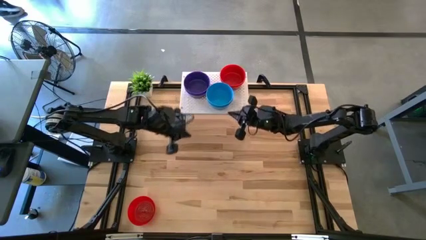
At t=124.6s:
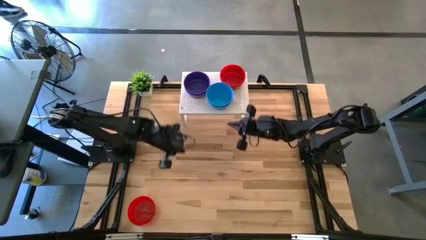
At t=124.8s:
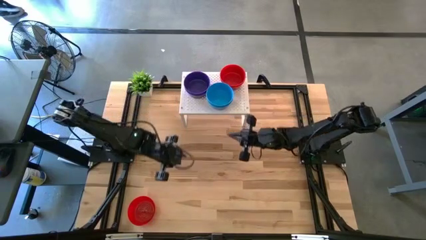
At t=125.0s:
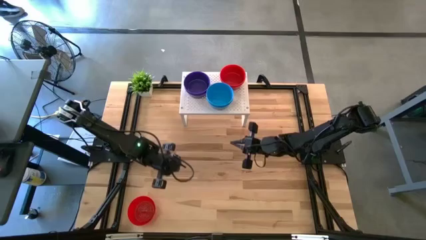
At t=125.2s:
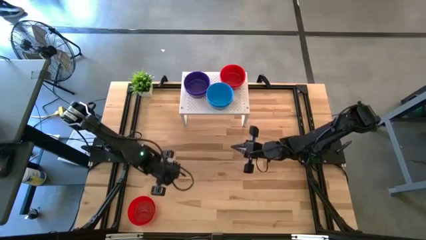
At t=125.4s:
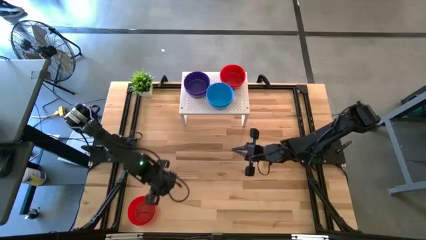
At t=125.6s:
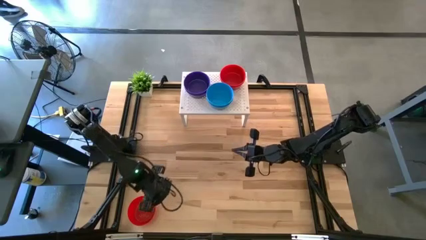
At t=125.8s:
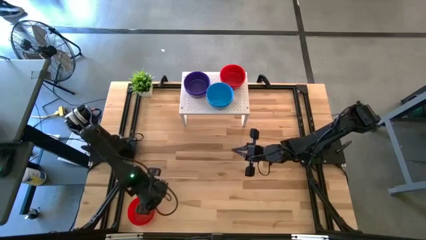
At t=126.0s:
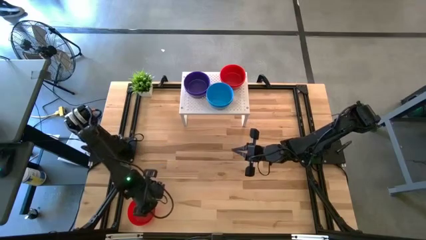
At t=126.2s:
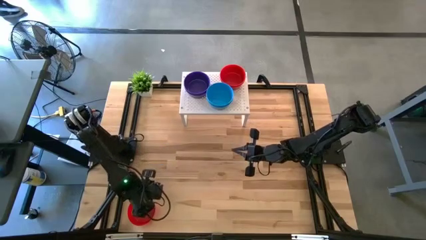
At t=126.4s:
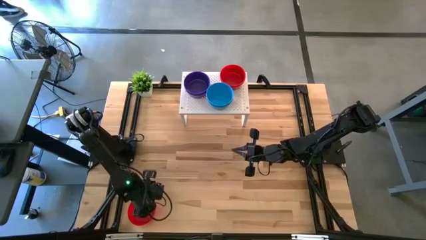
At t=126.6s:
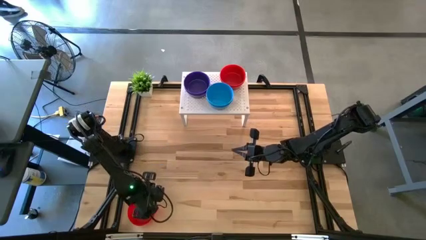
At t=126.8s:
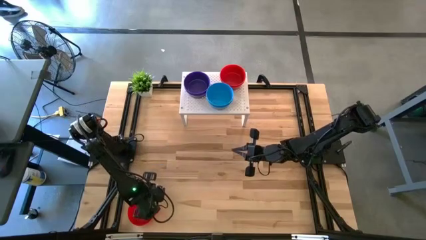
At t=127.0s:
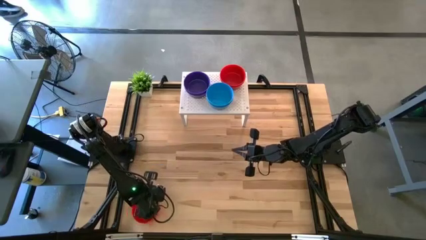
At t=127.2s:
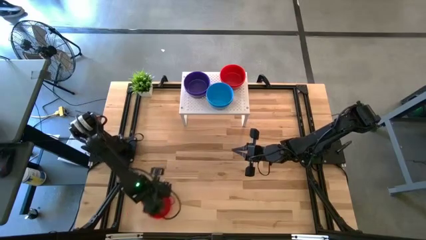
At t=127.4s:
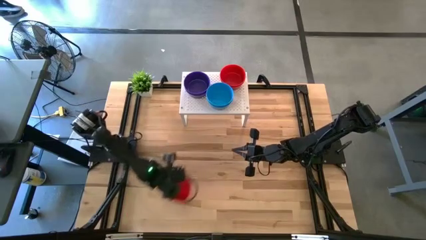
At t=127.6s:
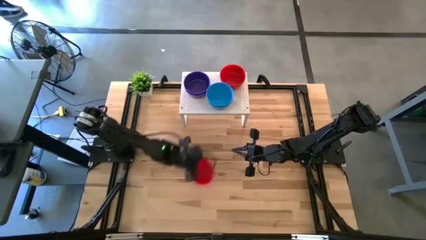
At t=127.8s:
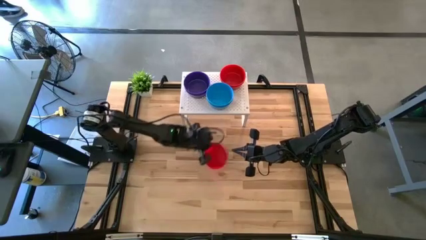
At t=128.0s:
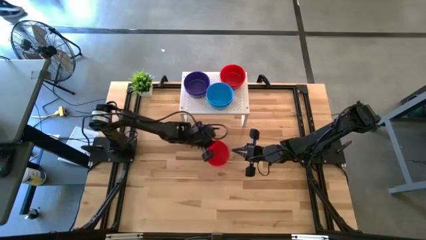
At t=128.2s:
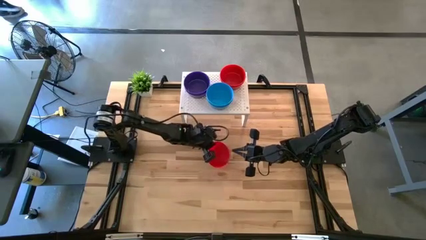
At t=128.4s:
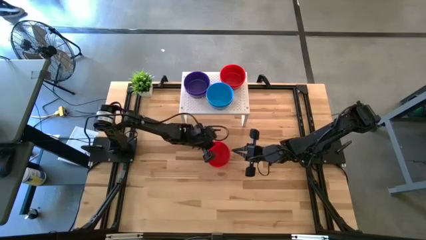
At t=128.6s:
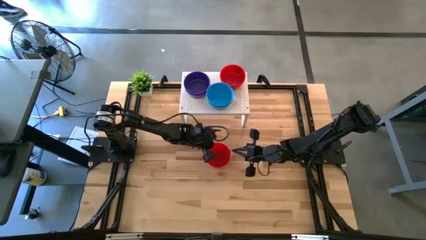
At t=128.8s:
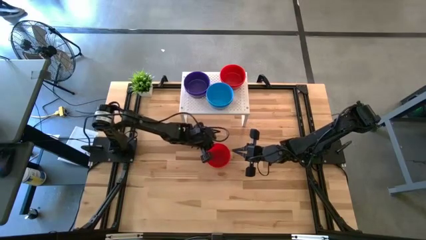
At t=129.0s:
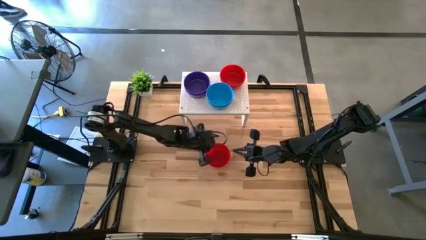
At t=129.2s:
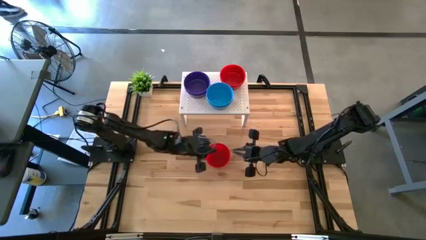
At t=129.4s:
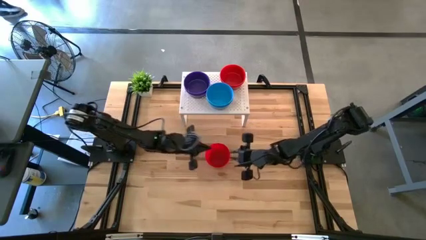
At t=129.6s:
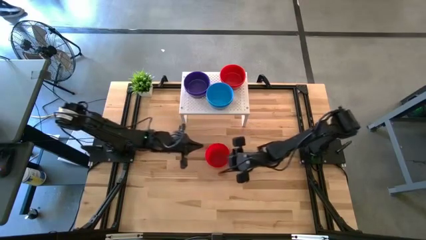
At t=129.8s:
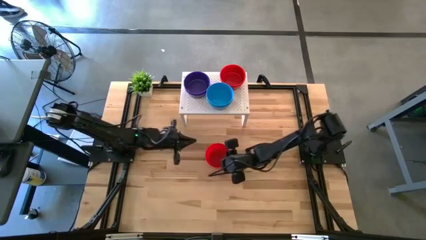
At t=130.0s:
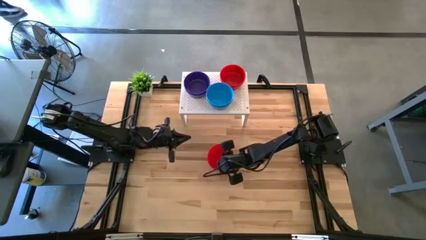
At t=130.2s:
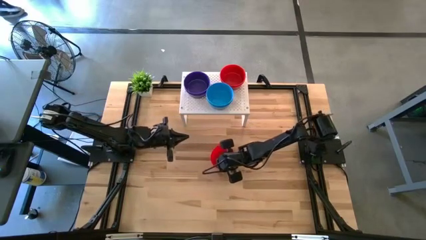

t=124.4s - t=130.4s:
Task: Pick & Place Mini bowls
Stack the red bowl on the red bowl on the shelf

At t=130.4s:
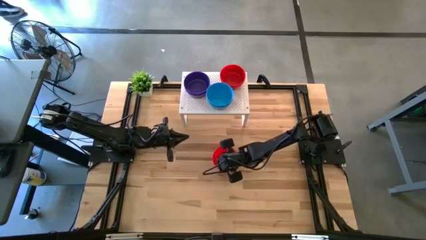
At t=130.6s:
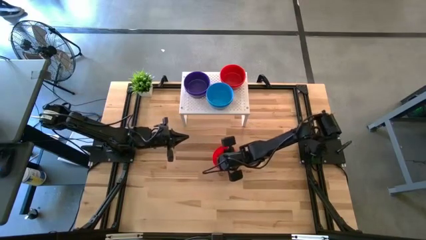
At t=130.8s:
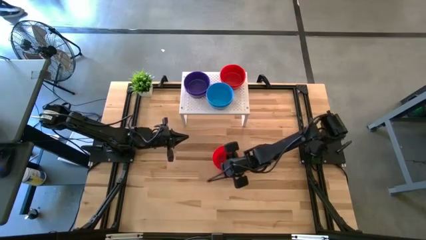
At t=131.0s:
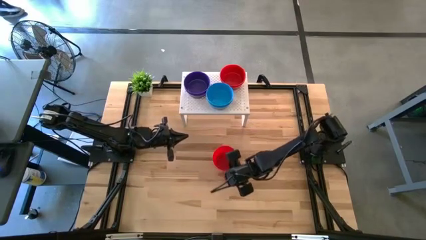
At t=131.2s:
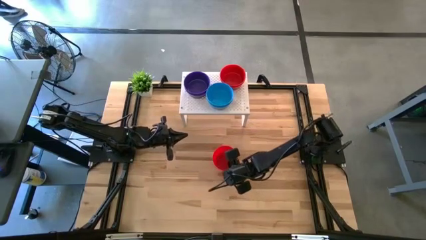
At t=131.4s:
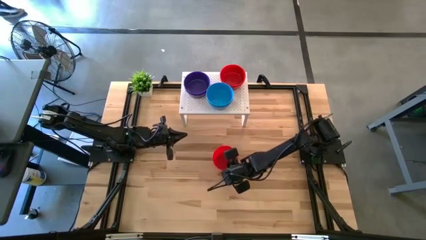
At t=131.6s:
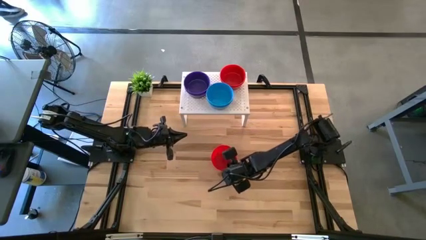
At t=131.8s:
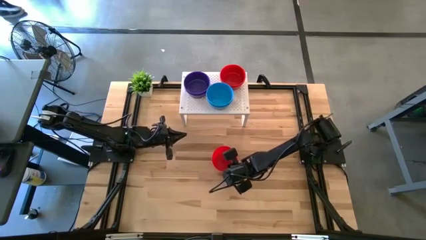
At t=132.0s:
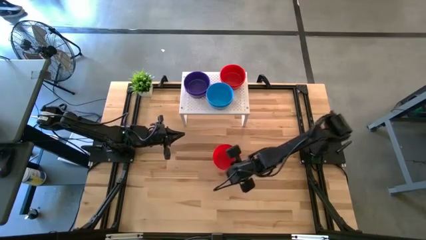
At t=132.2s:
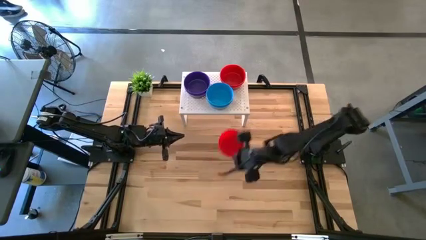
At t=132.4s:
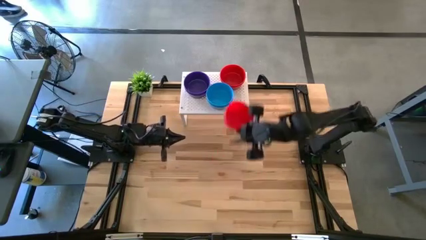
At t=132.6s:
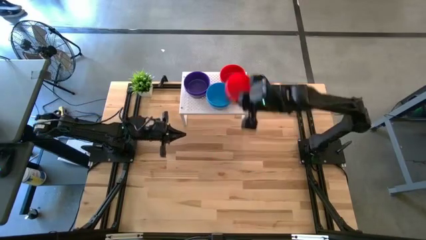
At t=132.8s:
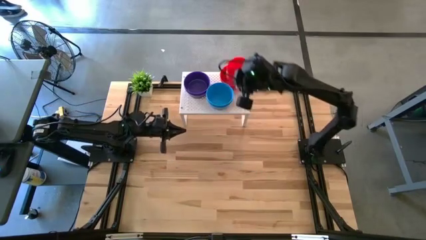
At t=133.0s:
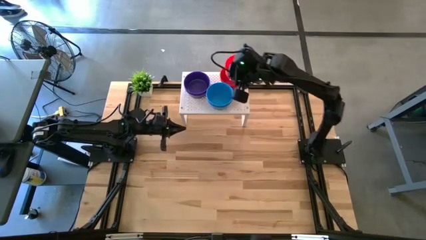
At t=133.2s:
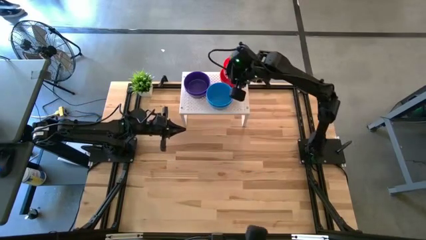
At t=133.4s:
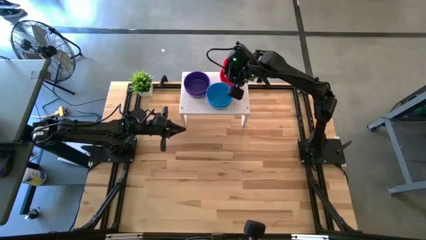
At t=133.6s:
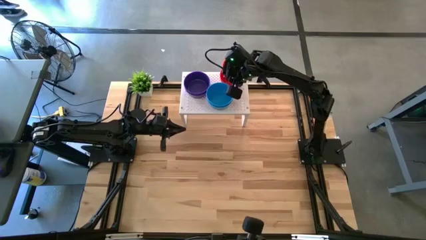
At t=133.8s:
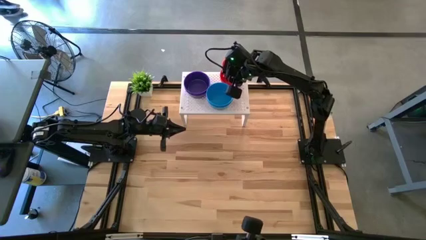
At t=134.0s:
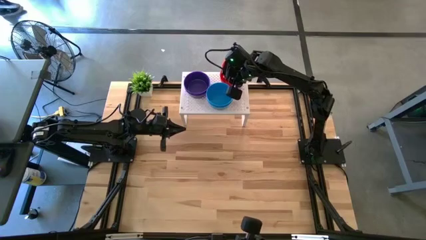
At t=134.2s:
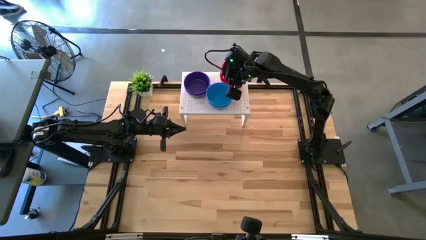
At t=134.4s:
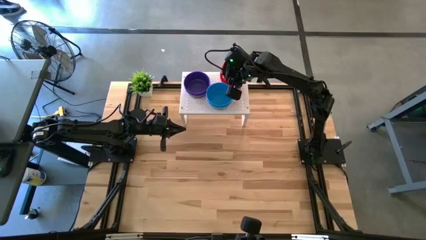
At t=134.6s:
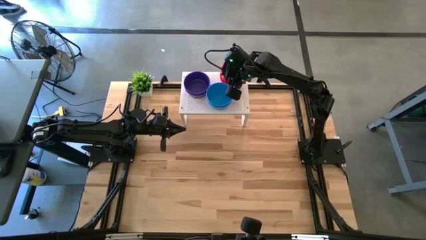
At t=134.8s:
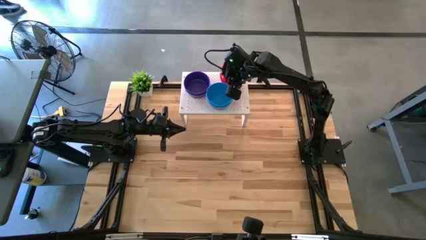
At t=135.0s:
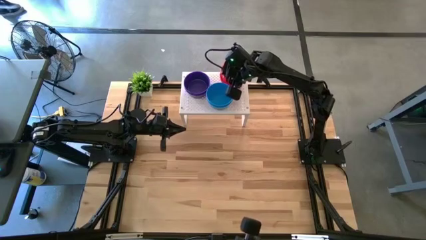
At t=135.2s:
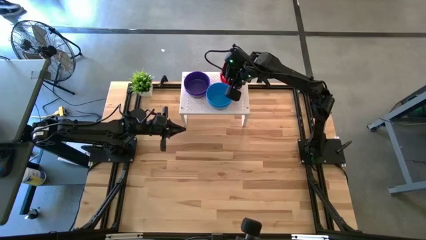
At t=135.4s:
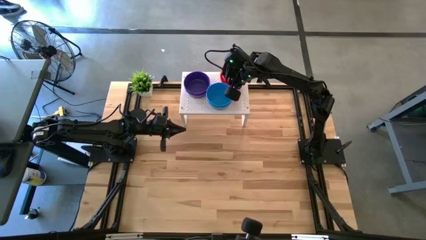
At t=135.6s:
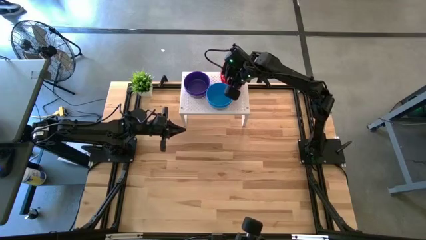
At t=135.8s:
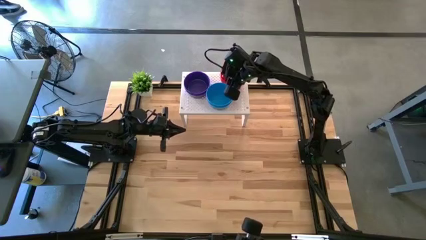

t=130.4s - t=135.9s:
Stack the red bowl on the red bowl on the shelf

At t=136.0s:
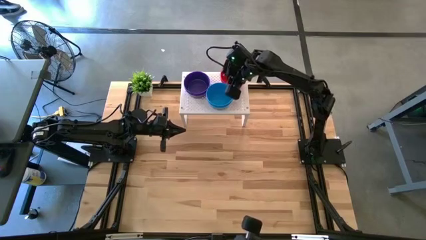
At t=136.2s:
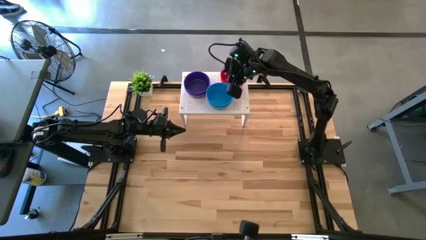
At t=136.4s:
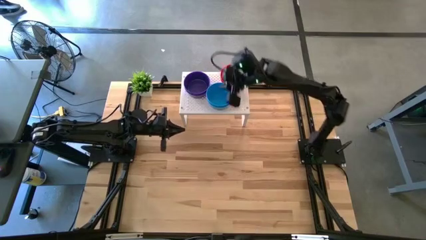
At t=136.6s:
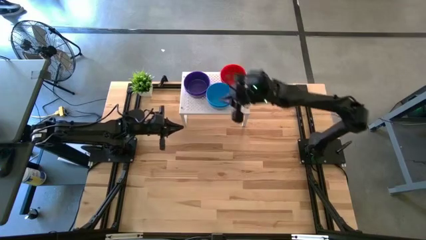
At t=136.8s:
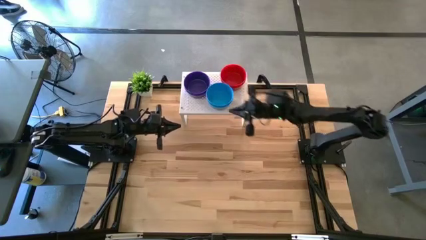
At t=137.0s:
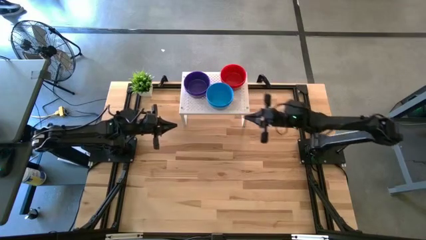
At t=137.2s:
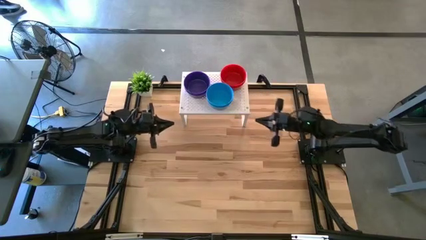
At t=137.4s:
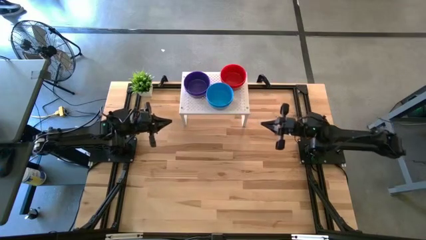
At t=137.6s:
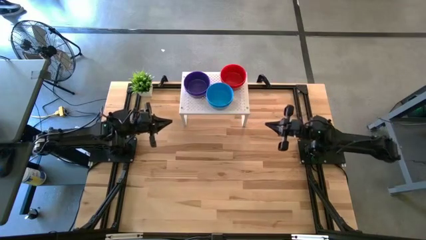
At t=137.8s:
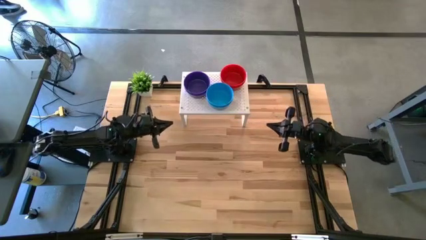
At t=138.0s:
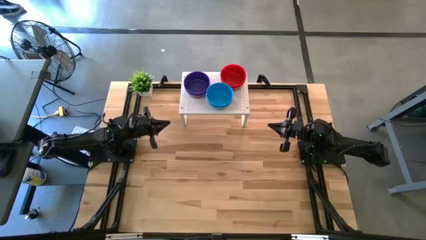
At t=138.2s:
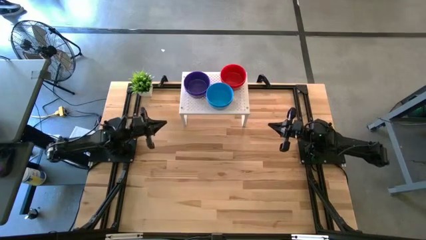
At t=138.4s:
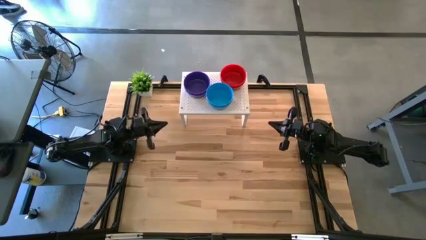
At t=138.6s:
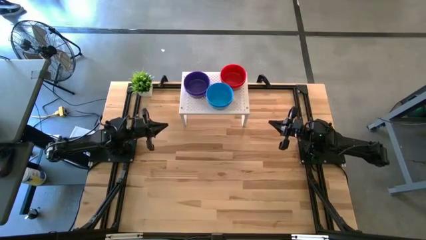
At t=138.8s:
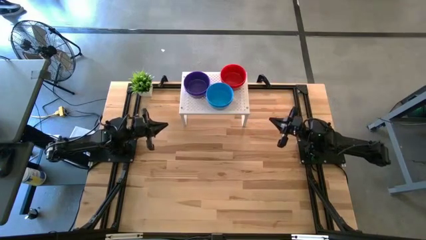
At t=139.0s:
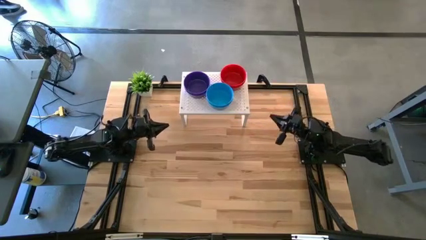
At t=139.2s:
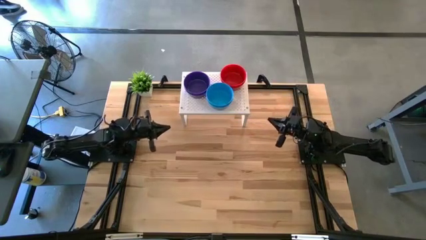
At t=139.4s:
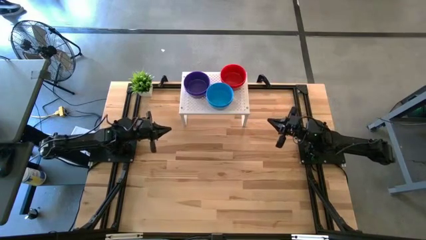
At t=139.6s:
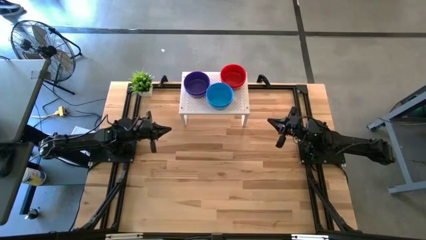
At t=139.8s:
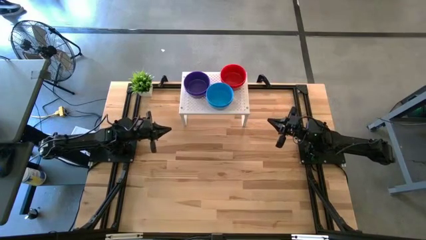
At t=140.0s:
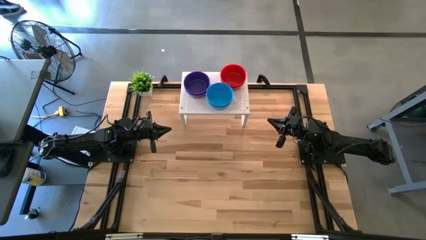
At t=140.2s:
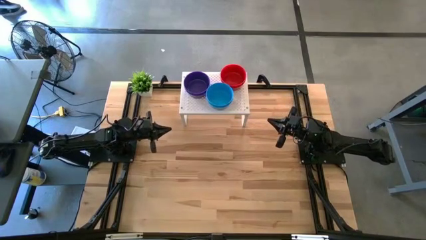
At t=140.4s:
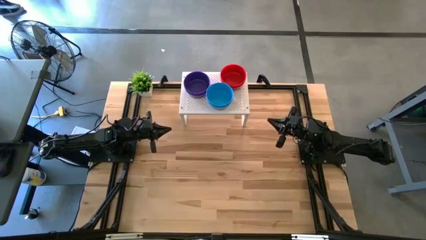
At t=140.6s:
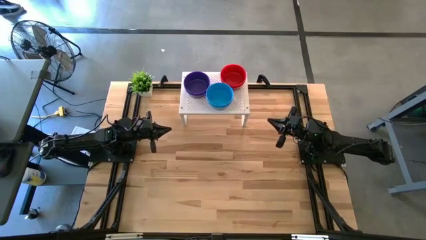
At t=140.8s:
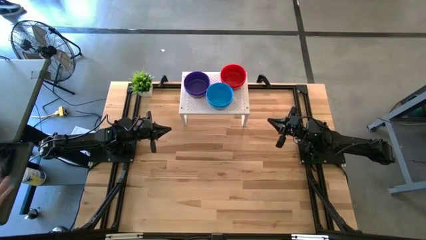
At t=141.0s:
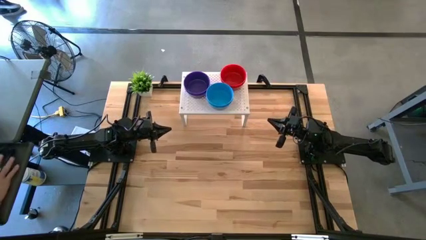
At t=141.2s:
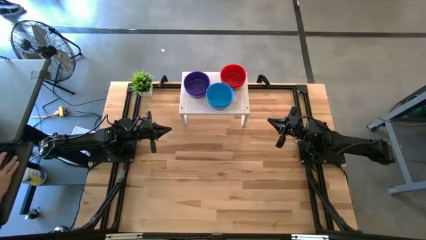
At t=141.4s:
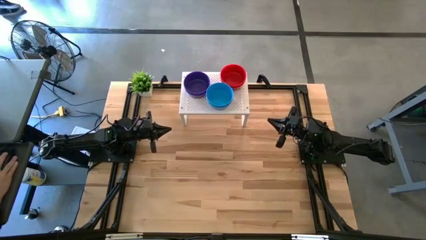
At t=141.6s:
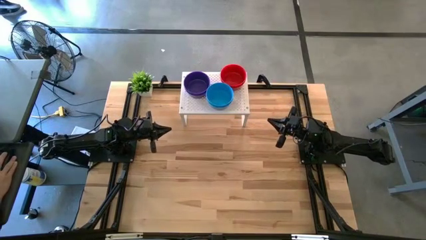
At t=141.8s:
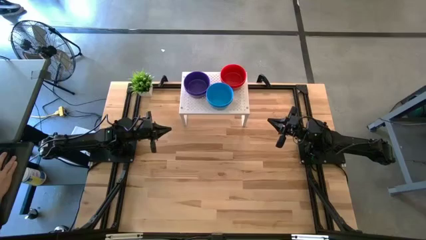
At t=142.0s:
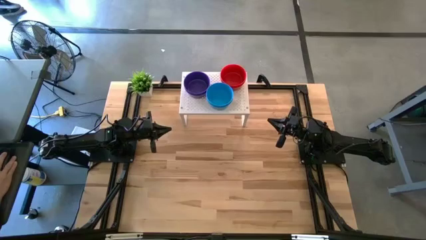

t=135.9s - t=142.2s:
Return to Home Position
